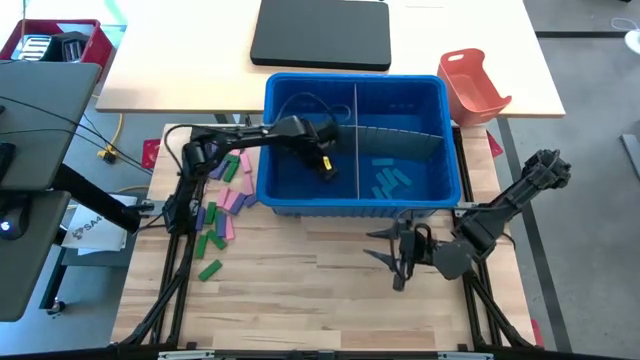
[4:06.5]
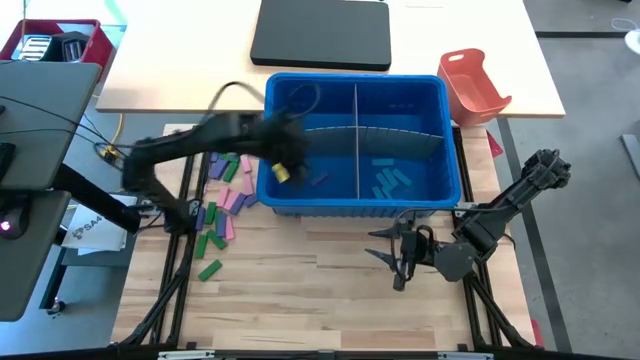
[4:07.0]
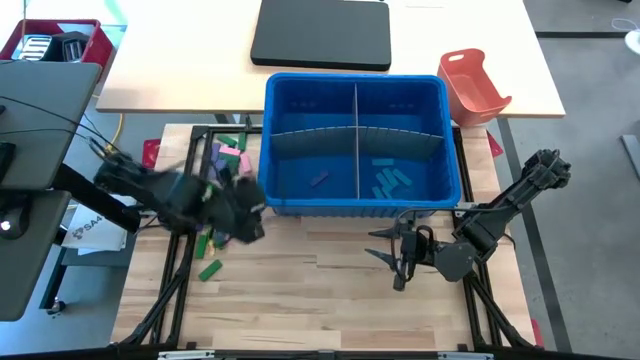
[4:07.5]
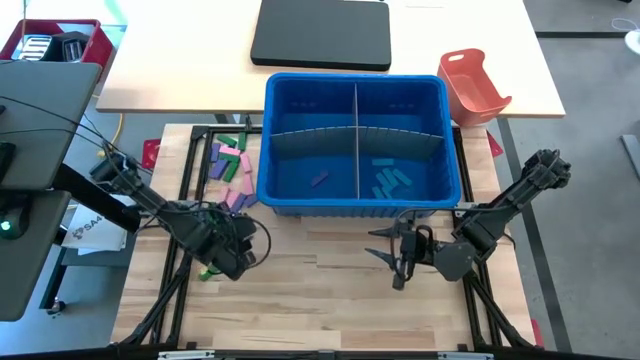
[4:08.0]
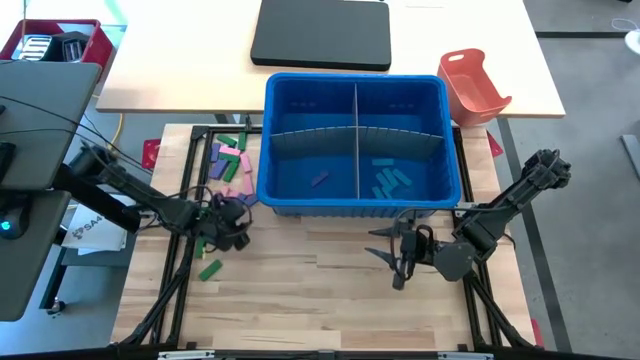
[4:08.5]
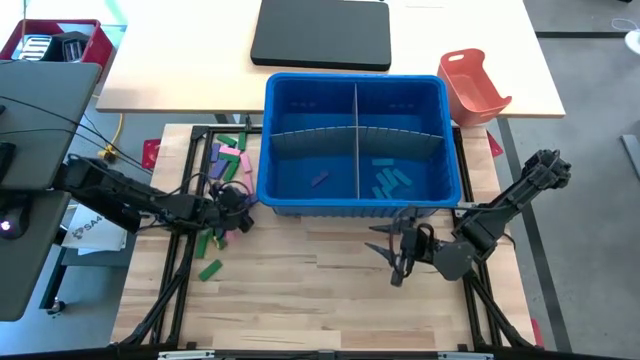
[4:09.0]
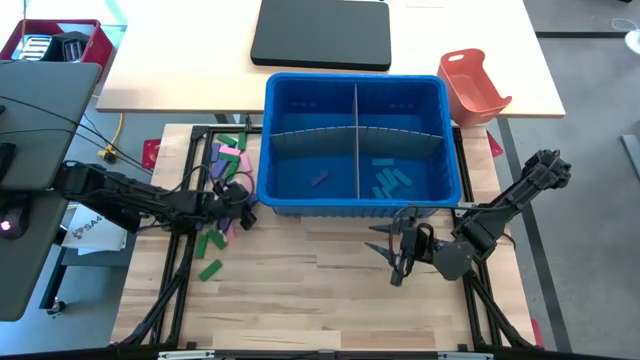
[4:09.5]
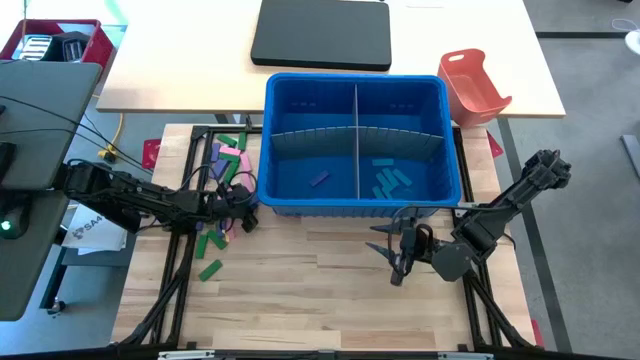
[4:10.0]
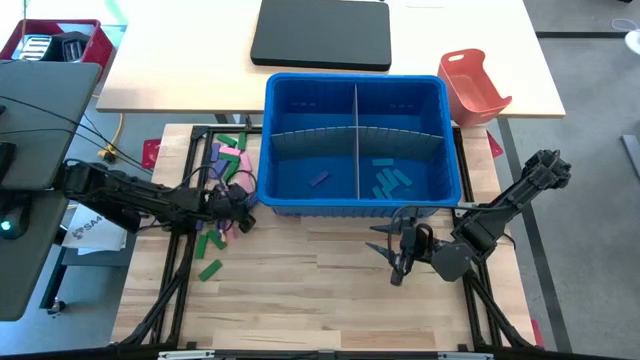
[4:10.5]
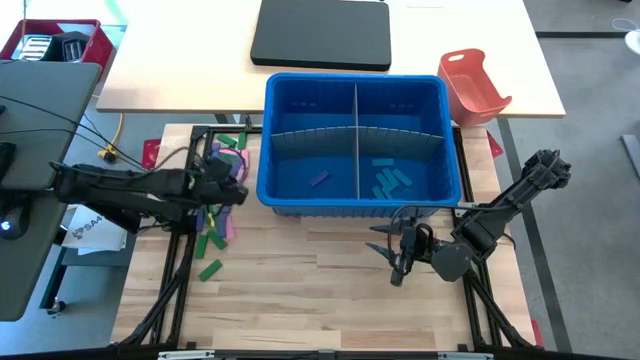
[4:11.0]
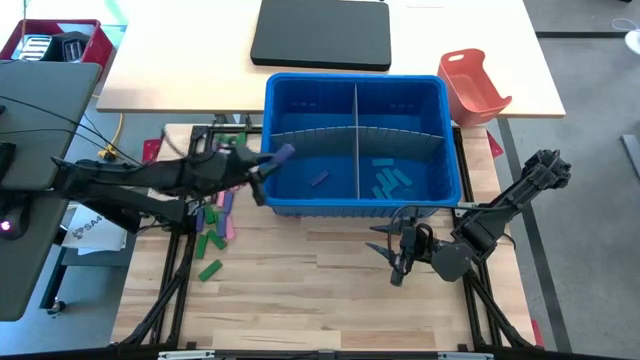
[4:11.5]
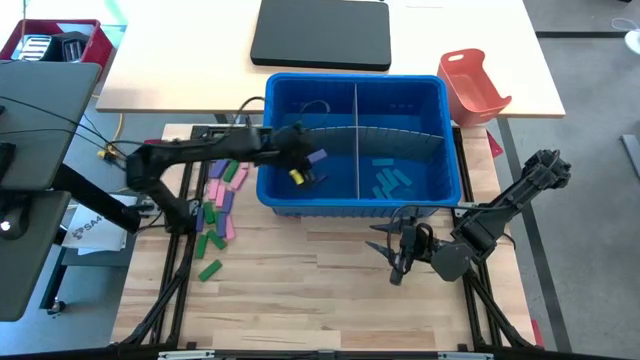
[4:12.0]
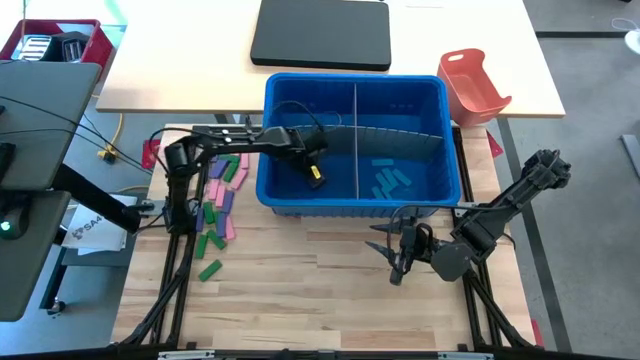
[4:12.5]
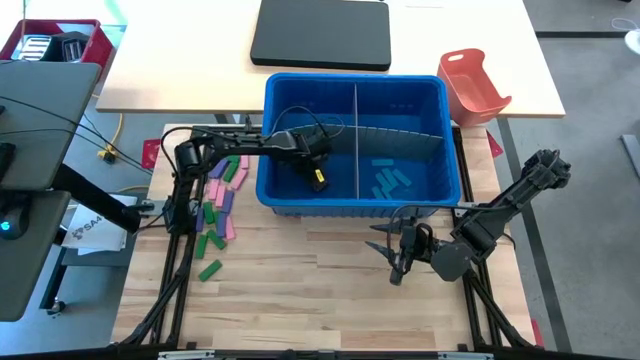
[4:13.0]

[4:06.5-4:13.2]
Task: Sort blocks
Put the purple block into the blue bin with the other purple block

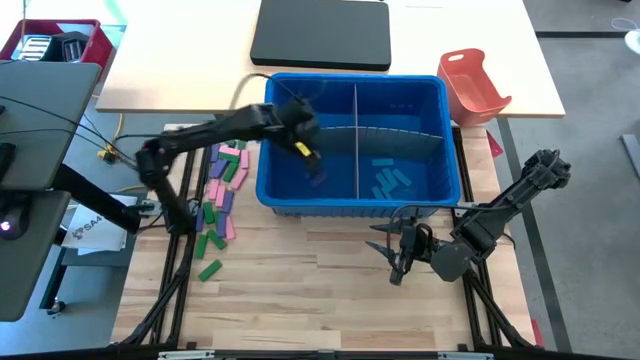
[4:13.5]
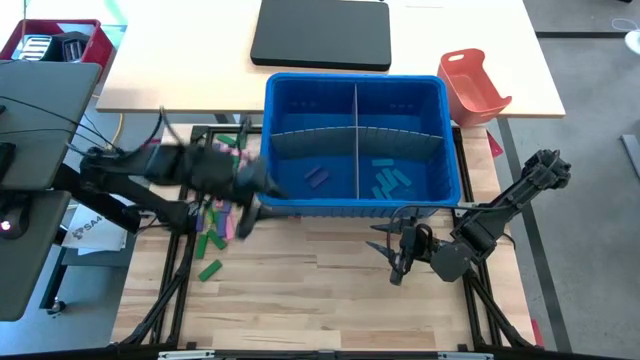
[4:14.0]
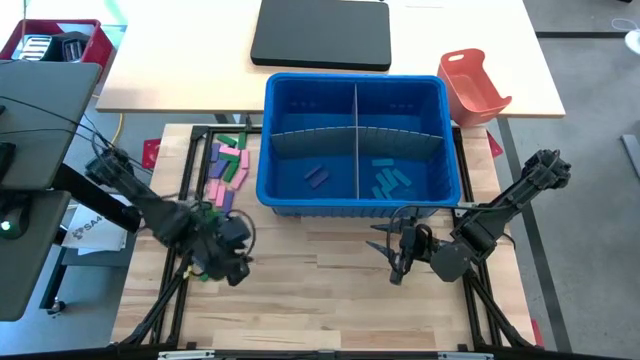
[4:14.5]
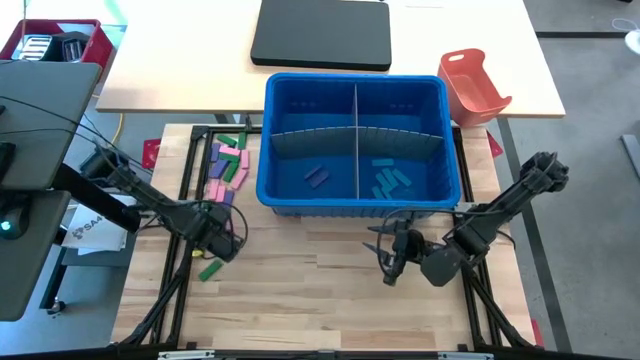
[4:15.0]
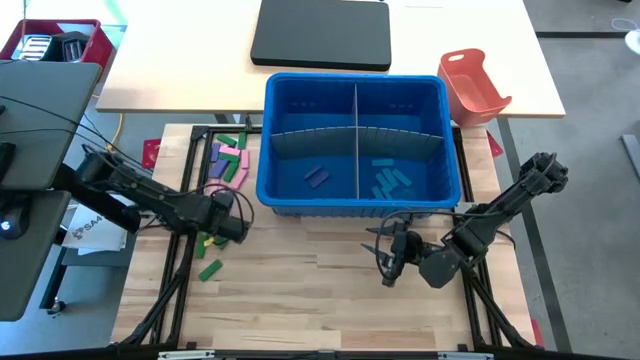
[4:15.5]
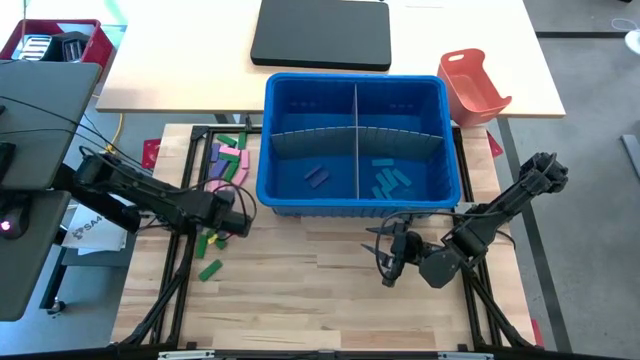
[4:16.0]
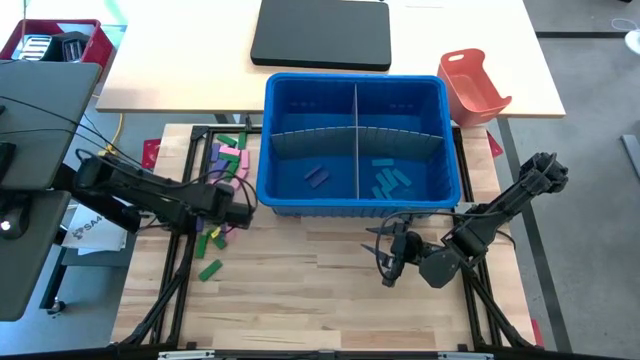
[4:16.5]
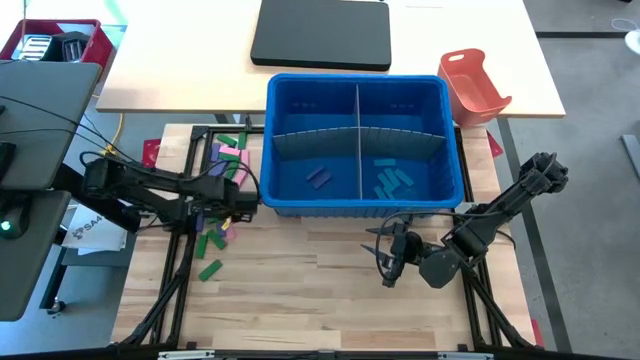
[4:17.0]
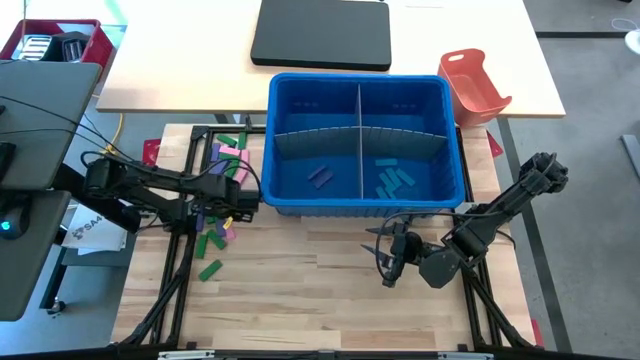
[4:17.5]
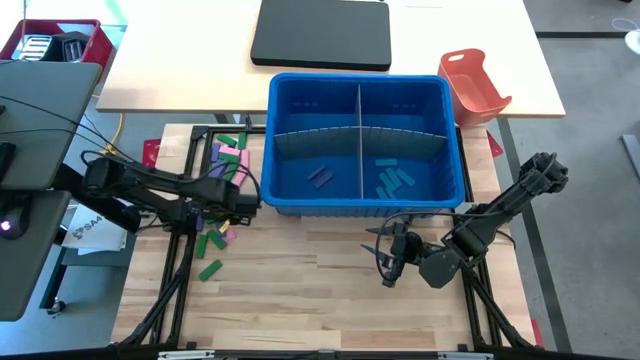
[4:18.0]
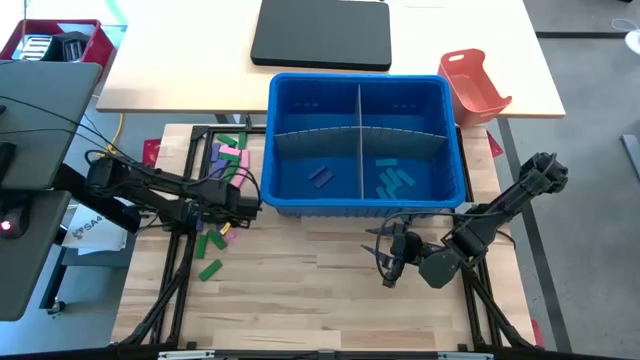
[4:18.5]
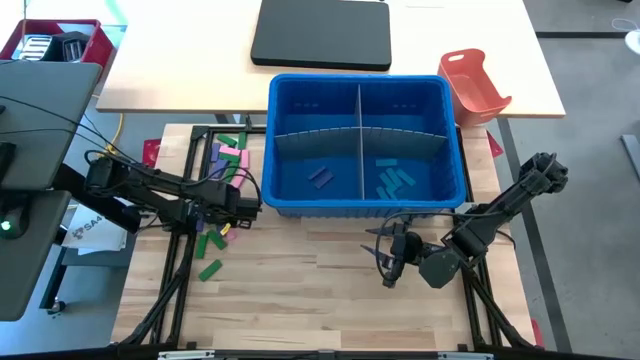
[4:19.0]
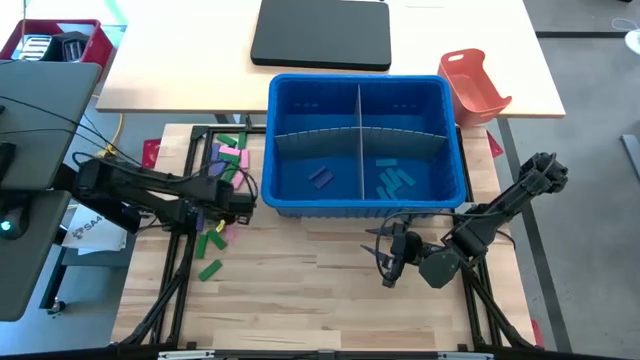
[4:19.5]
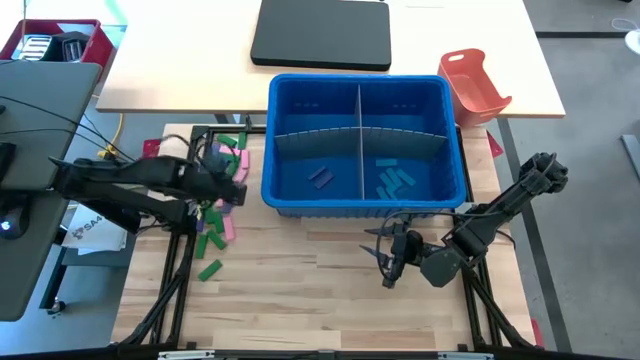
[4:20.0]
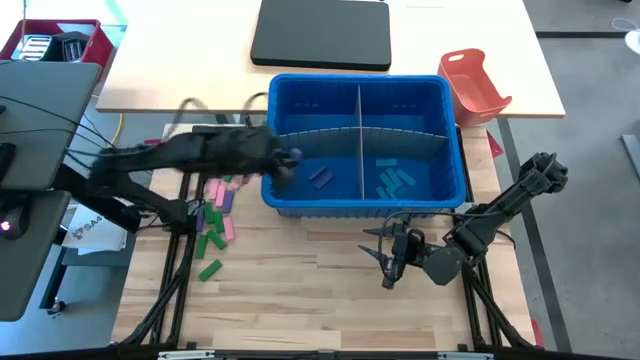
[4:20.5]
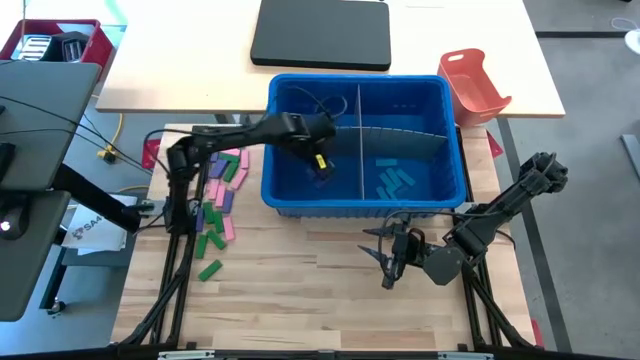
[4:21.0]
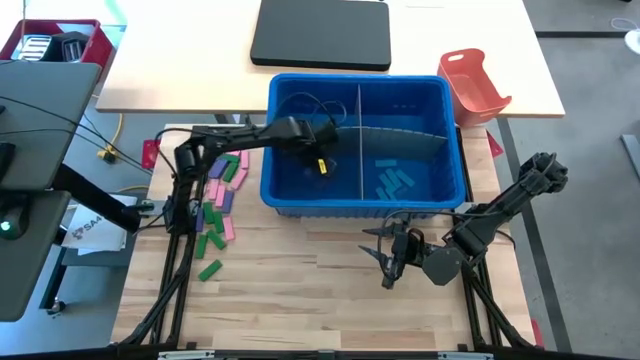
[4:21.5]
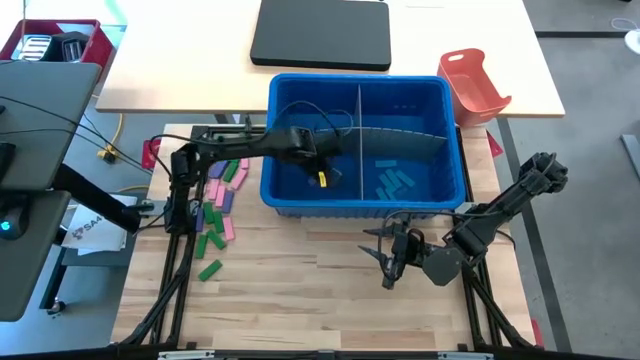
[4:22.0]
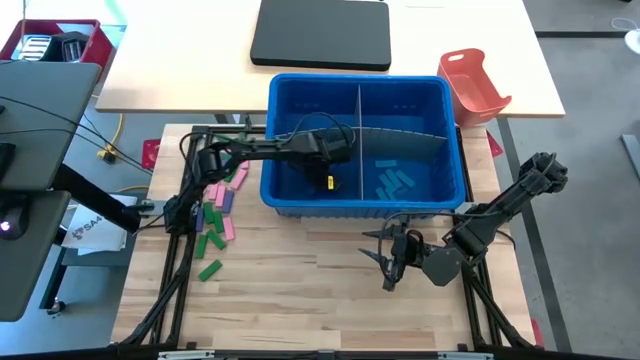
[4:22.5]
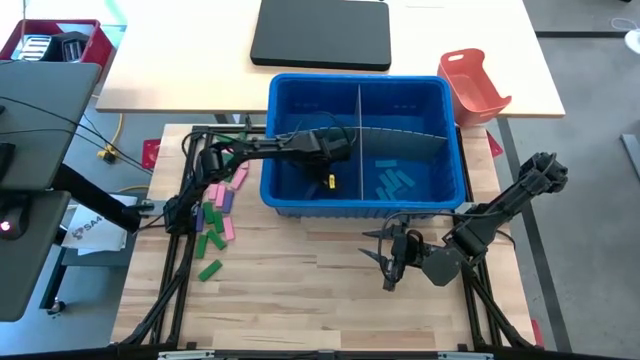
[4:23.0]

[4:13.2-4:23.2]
Put the purple block into the blue bin with the other purple block

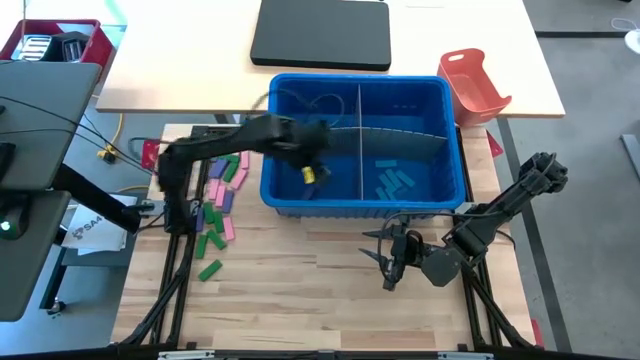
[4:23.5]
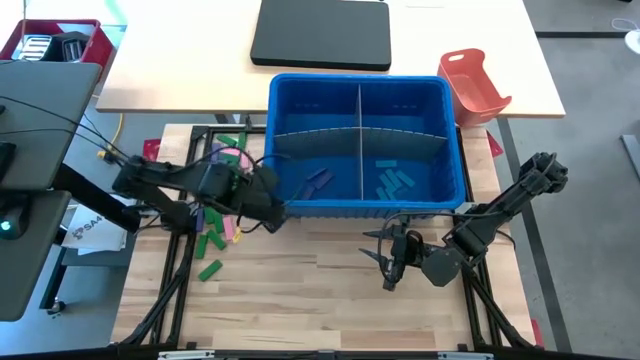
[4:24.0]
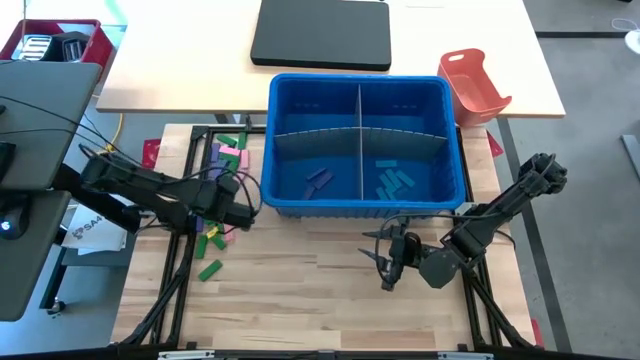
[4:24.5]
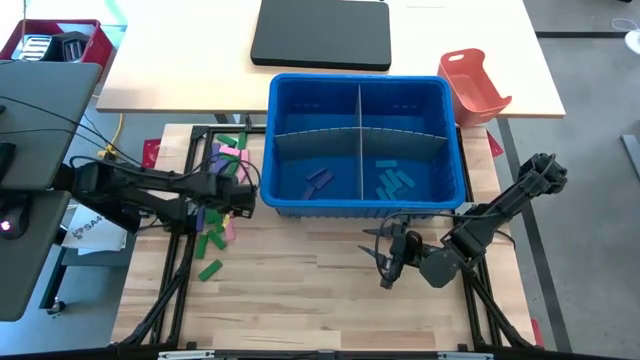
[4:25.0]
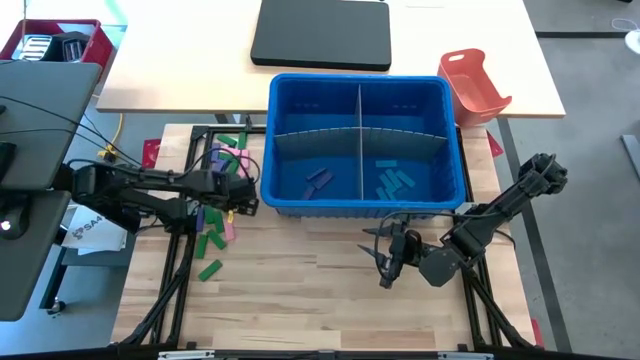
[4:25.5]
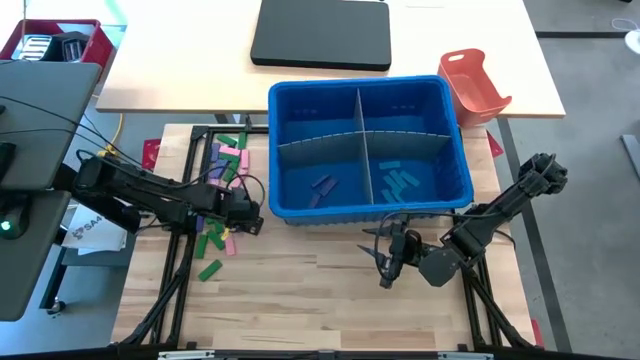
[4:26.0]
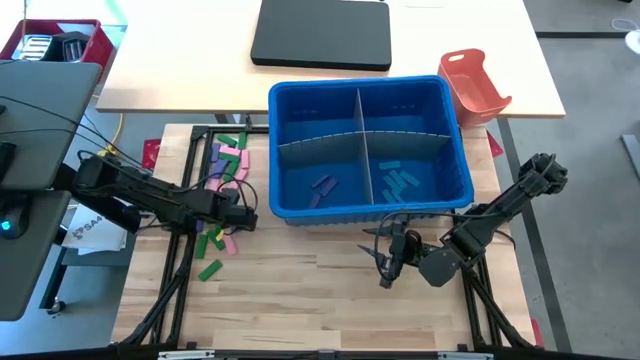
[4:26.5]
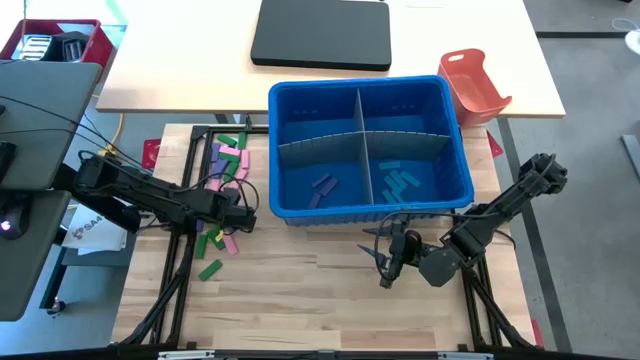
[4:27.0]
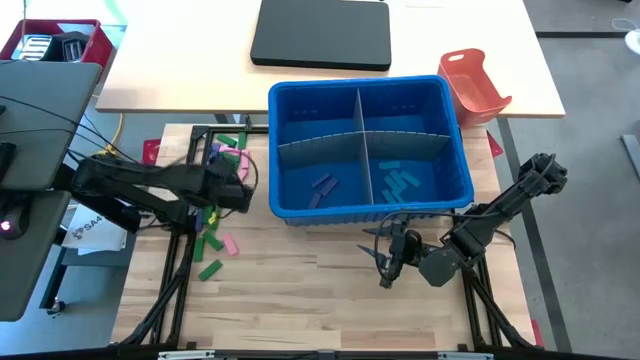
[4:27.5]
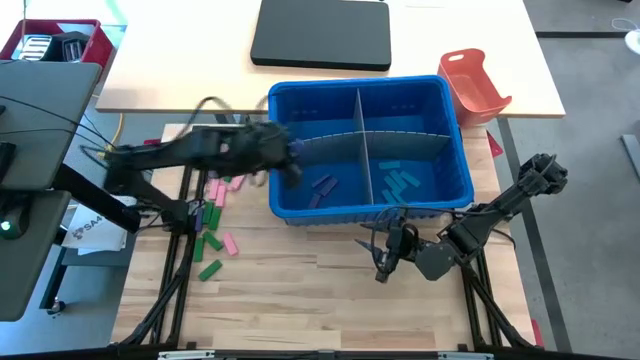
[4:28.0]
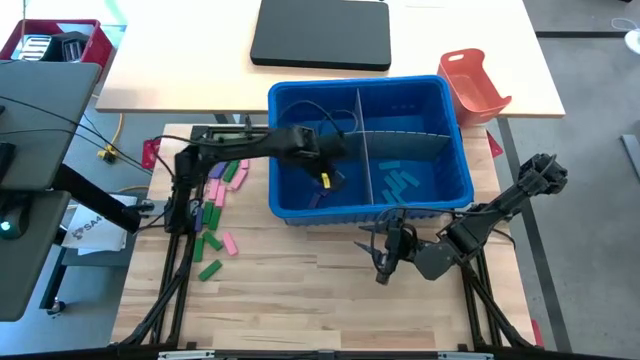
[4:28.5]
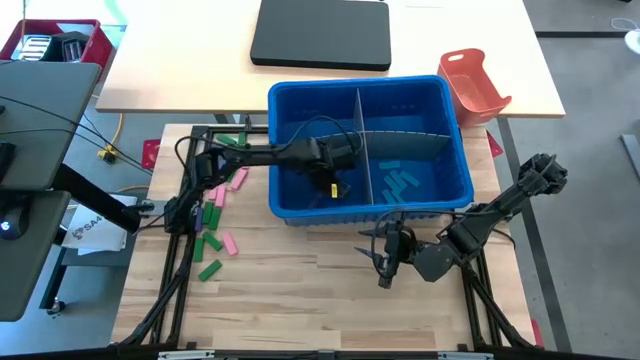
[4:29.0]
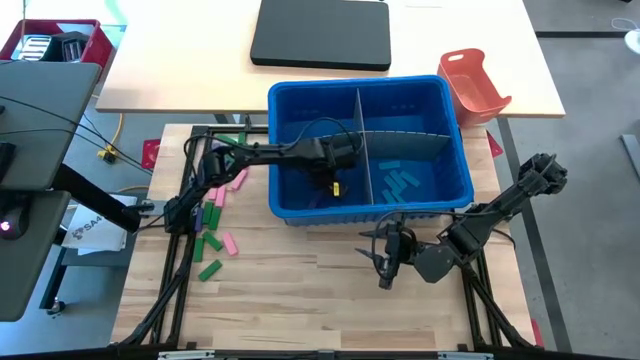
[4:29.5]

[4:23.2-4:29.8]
Put the purple block into the blue bin with the other purple block
